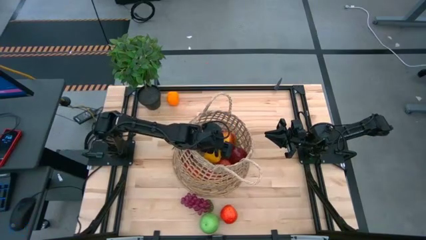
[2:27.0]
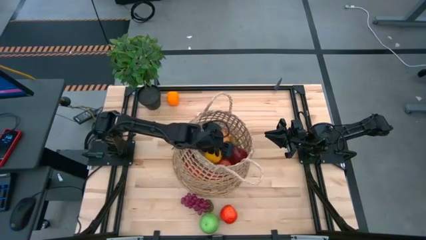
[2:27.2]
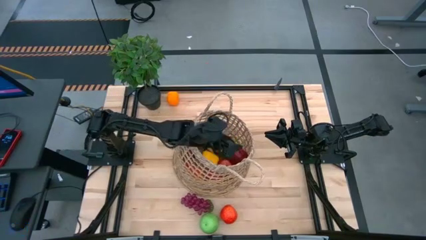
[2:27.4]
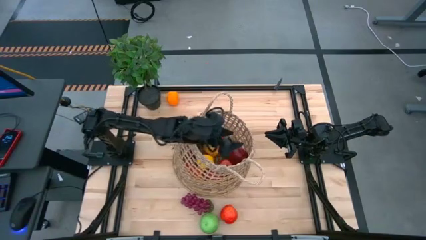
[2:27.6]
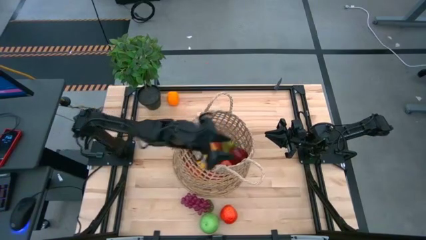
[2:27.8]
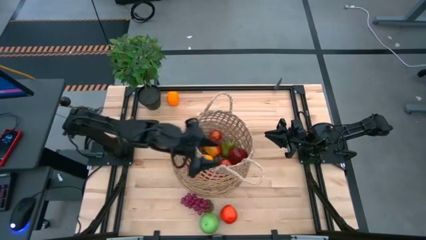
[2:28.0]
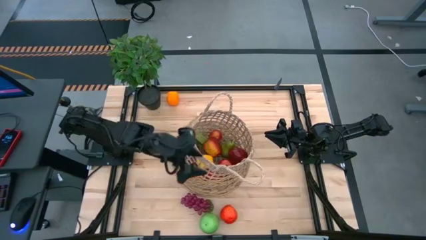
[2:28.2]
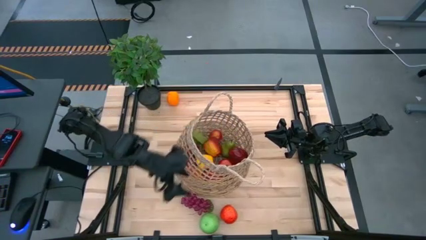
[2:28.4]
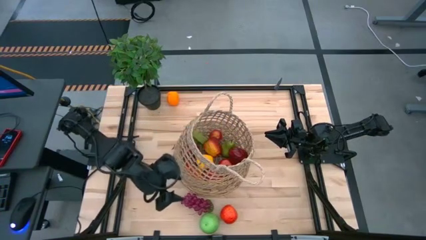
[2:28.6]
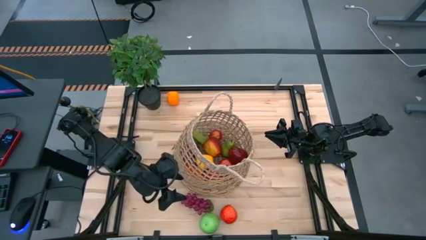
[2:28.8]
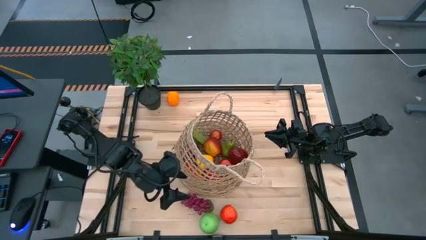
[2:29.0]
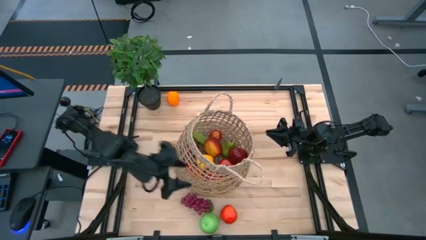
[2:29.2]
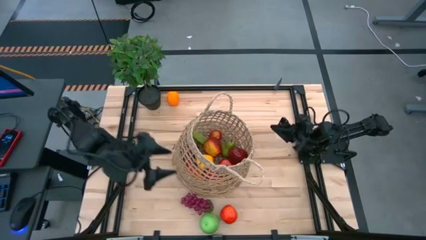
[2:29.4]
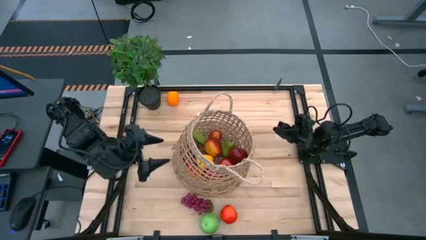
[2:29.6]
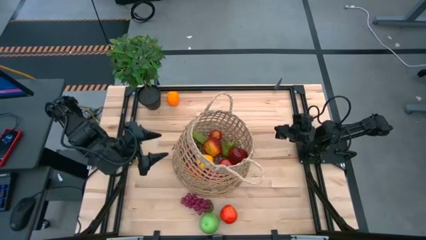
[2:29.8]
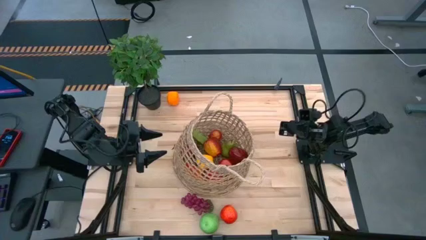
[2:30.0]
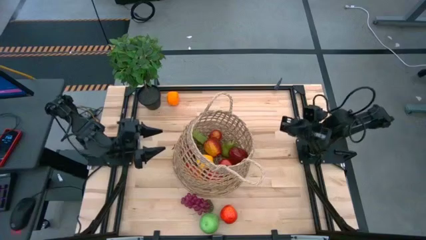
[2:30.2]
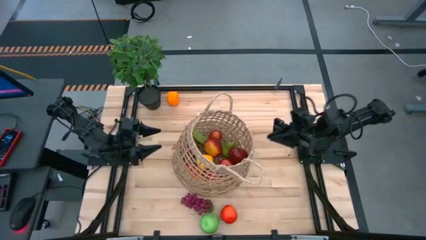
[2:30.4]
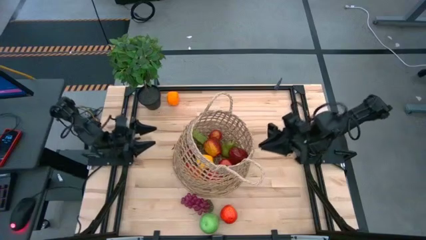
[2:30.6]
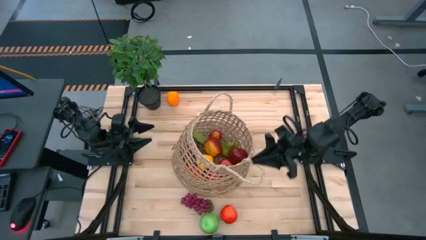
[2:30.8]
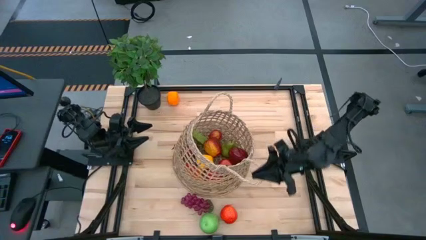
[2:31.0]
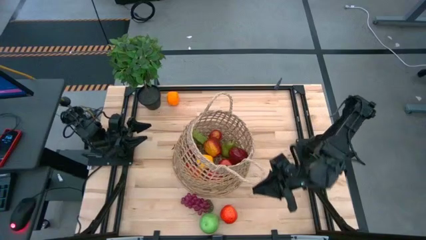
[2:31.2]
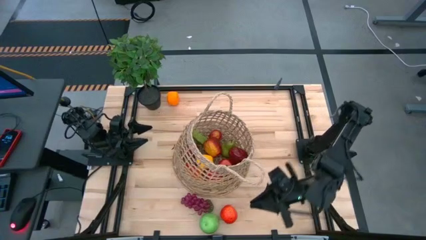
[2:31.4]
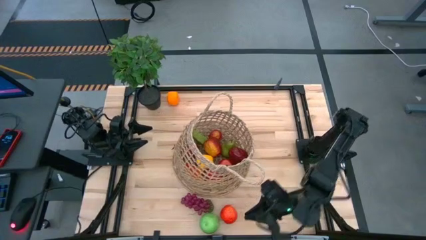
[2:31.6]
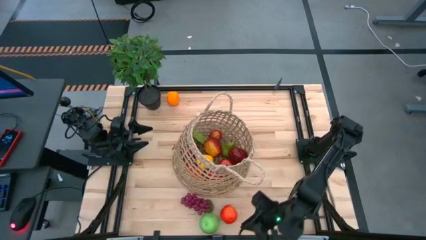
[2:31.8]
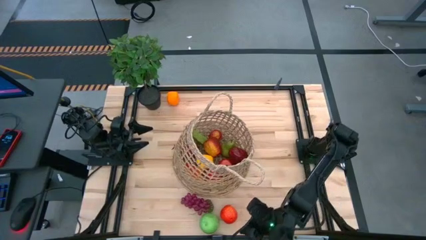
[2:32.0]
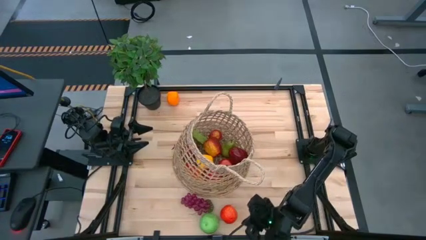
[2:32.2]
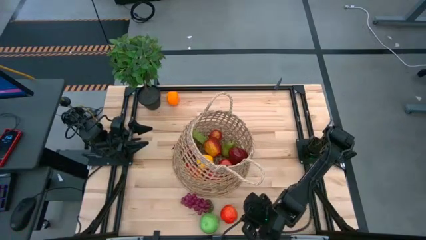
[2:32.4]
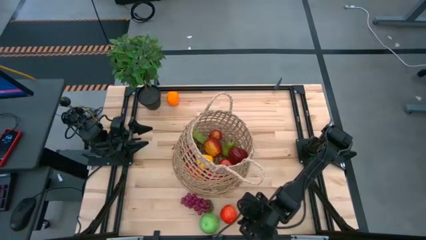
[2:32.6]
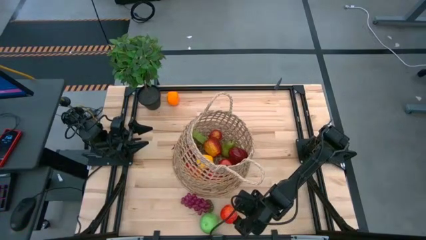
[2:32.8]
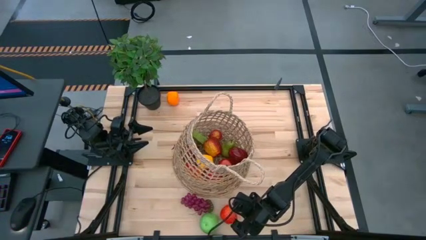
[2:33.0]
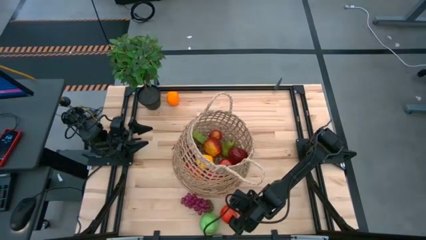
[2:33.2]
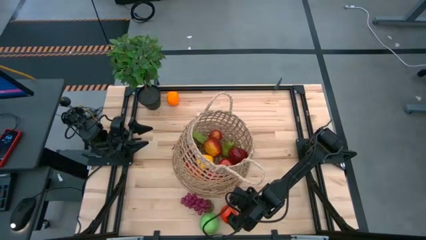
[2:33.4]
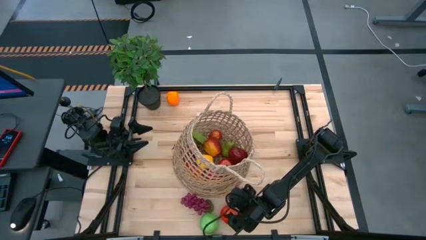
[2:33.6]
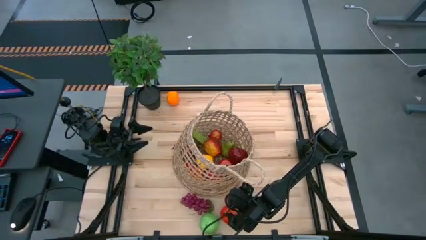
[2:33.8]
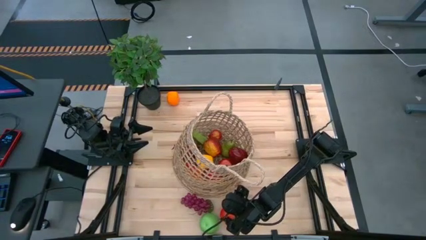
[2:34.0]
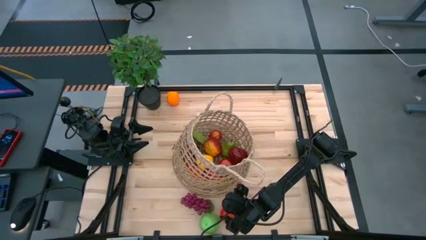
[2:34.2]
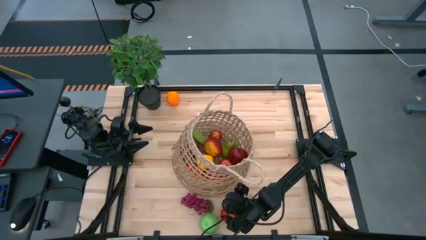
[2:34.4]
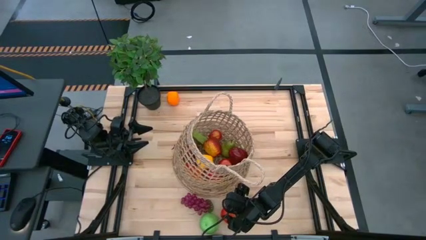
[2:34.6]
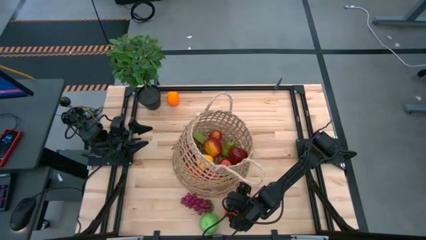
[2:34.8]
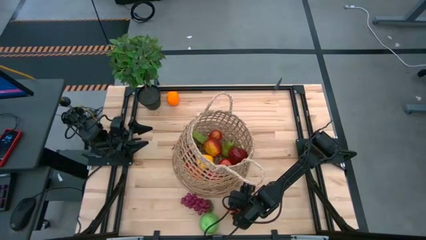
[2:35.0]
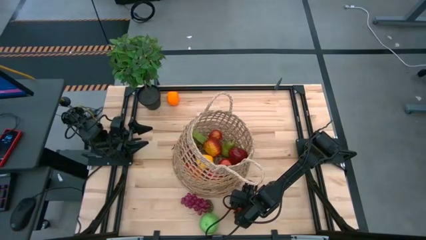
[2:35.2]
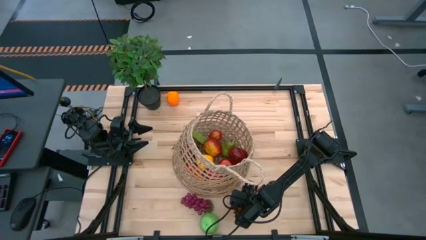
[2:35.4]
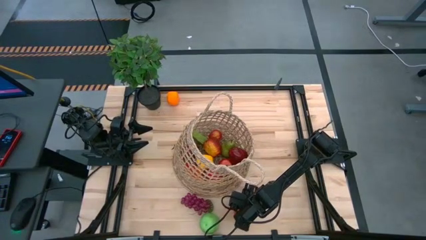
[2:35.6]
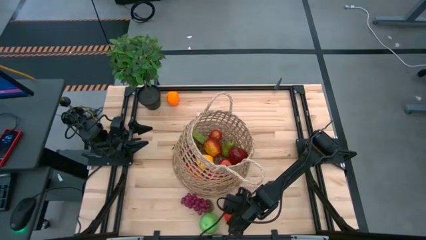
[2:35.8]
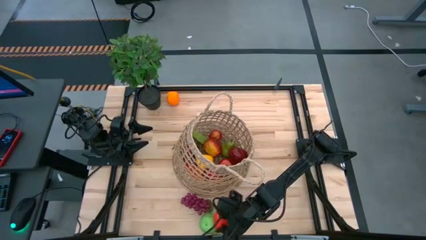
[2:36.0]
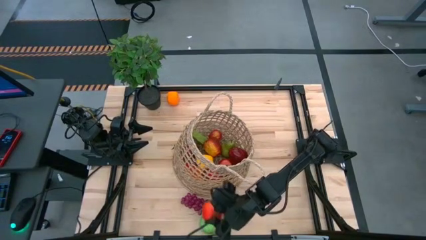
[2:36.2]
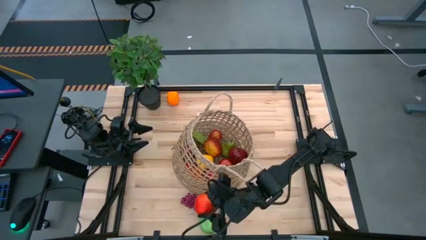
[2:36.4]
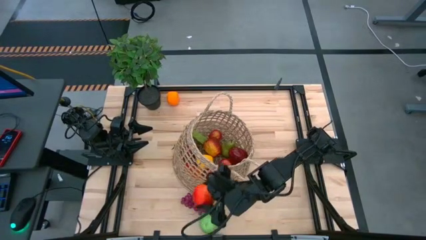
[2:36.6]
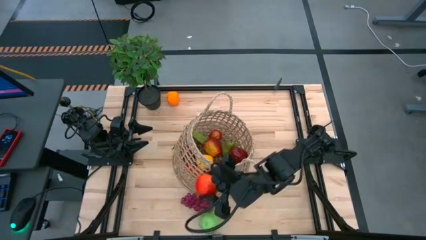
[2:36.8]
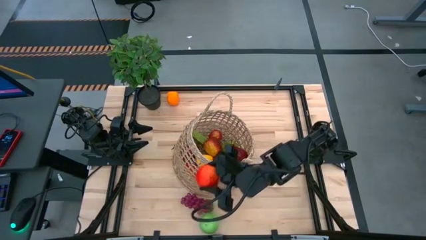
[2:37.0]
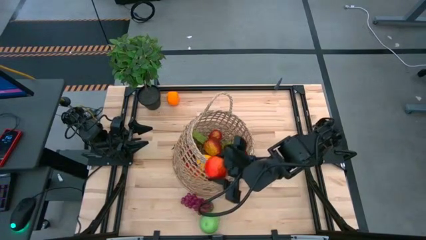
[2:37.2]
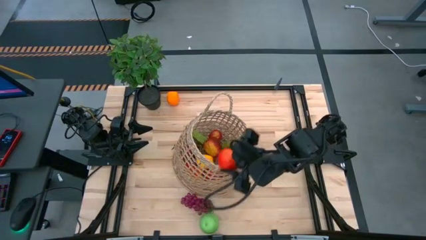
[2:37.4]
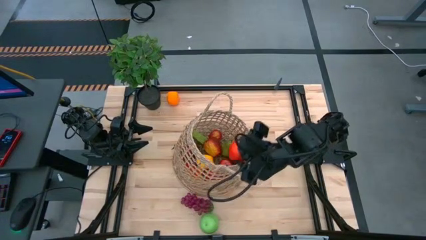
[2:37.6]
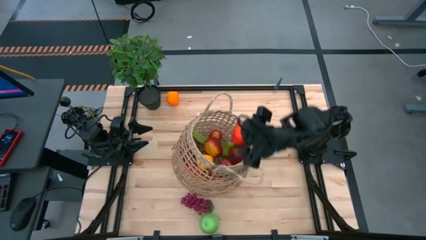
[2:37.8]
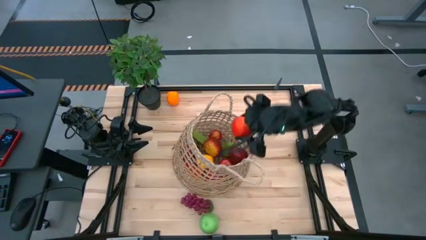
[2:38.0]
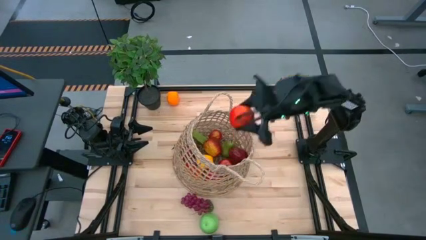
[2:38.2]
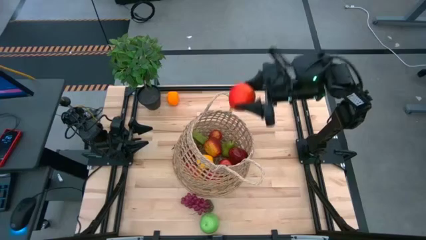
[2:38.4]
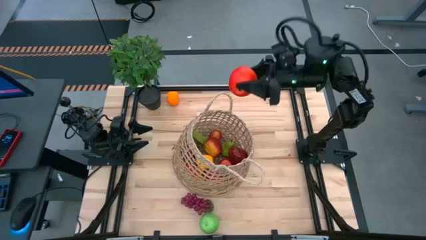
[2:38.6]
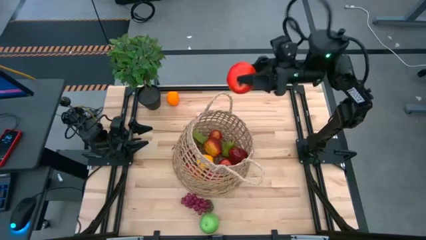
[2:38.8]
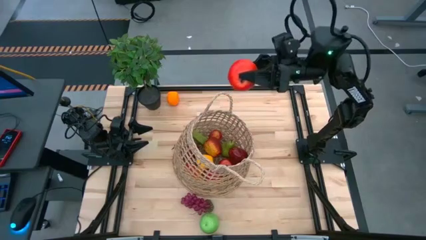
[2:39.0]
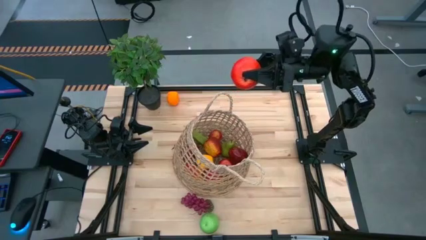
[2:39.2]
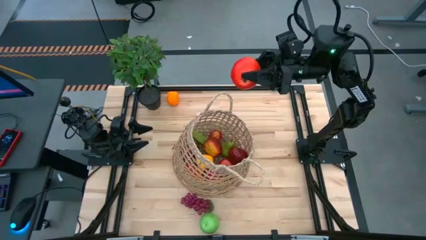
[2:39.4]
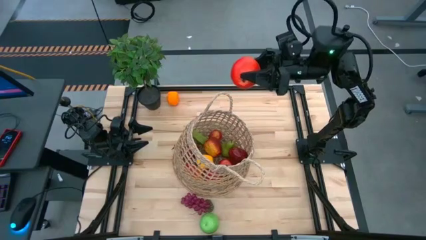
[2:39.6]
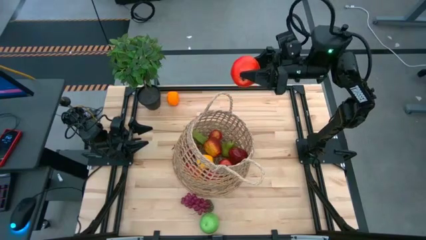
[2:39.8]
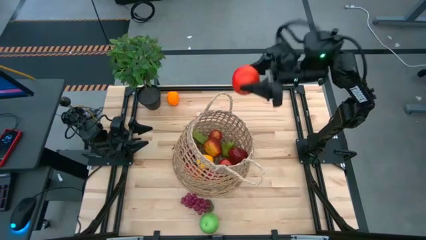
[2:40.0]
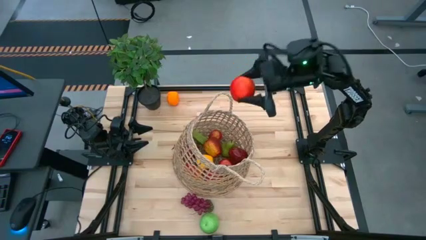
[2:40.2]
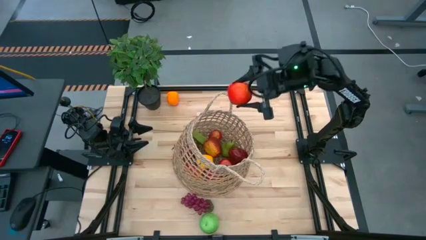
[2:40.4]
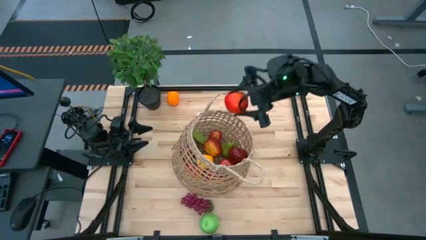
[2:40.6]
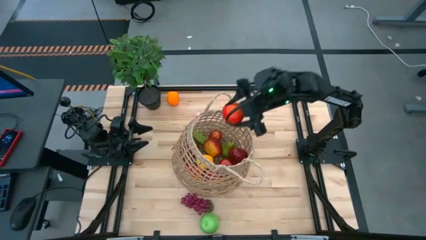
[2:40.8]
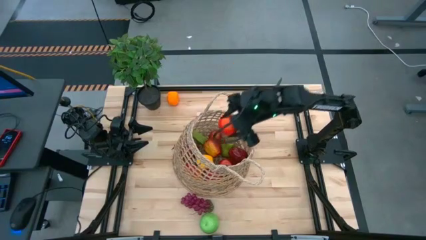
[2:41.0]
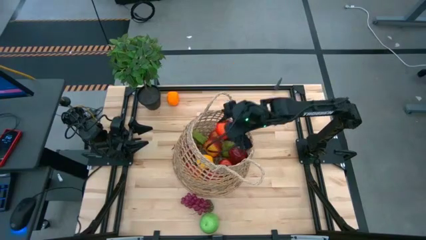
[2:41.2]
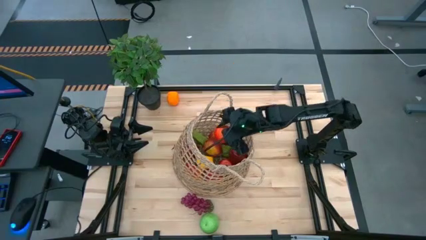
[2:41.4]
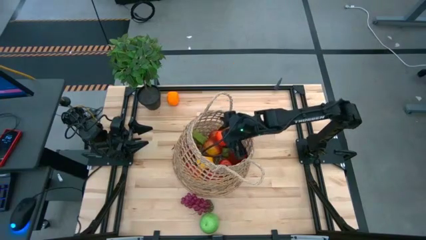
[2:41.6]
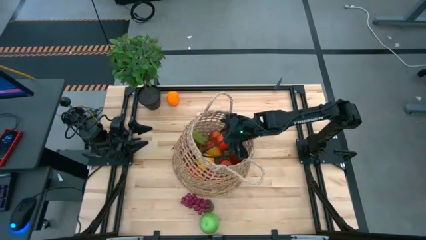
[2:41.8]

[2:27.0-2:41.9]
Task: Build produce basket
Put the apple into the basket

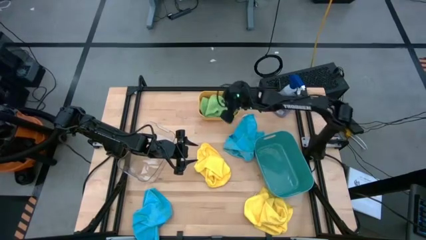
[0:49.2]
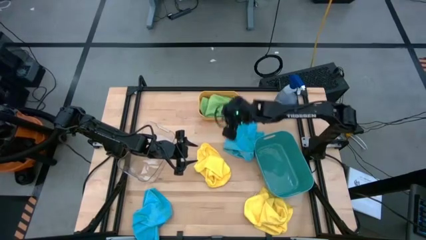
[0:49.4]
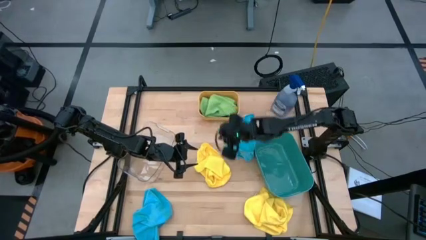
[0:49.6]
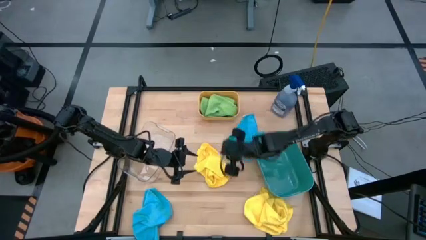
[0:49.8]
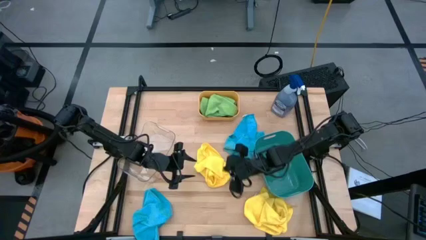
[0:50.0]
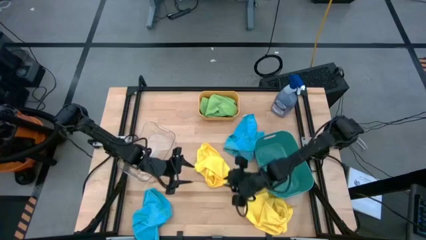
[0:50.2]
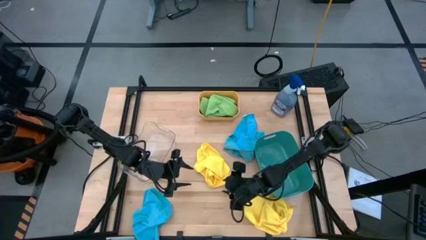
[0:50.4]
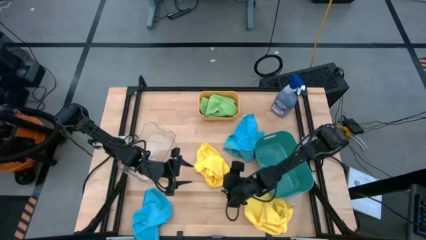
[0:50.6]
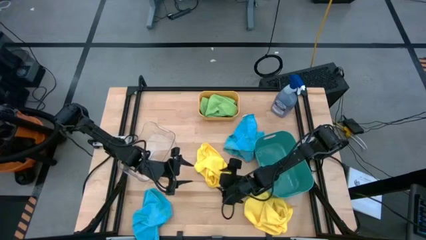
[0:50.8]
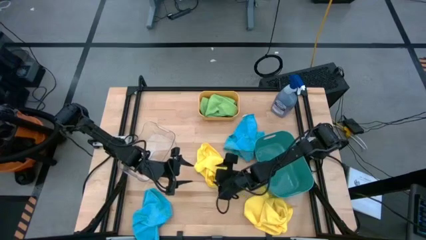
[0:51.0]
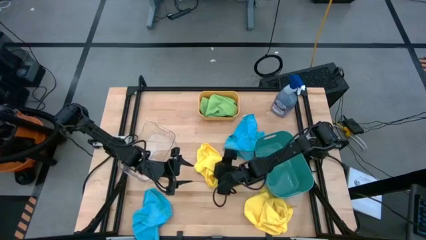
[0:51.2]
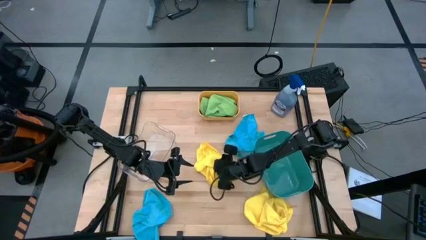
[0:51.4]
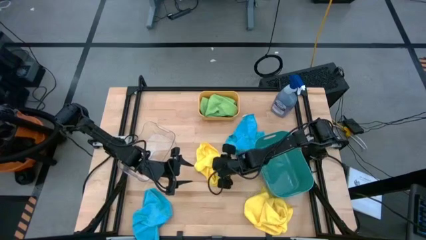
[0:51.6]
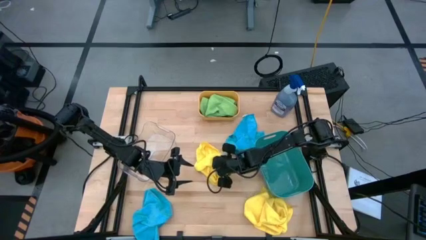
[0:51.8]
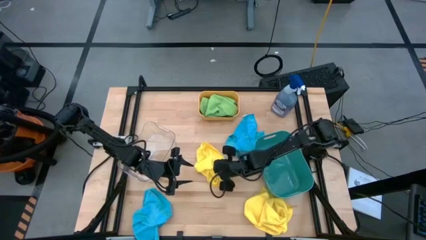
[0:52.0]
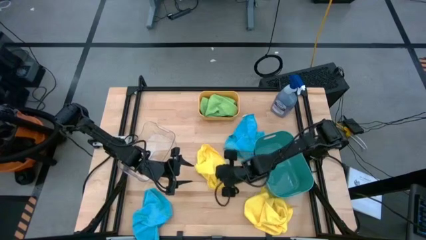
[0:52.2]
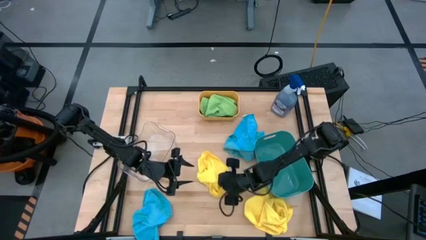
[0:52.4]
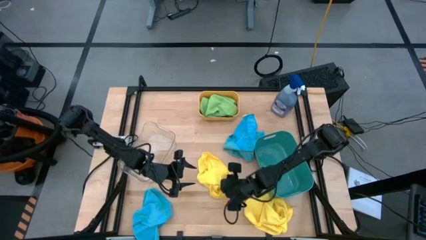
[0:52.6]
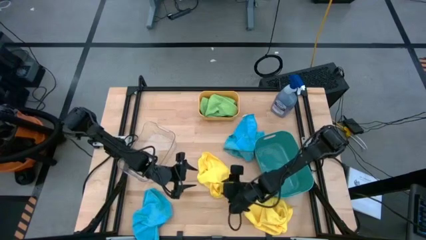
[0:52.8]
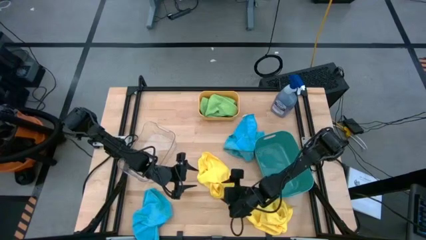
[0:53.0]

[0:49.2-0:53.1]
Task: Sort microfiber towel by color & place in baskets
Put the top yellow microfiber cloth into the green bin
